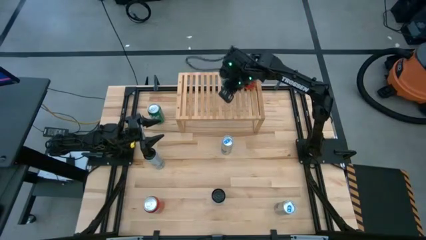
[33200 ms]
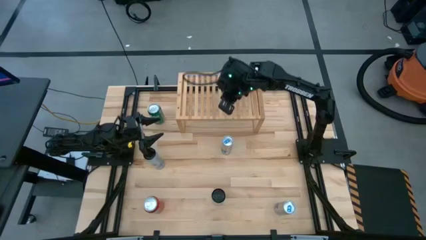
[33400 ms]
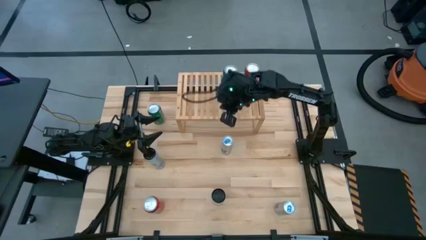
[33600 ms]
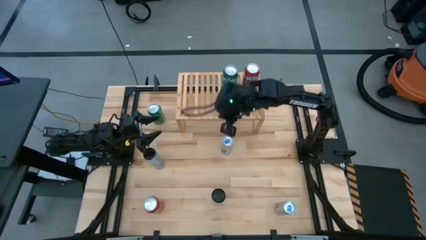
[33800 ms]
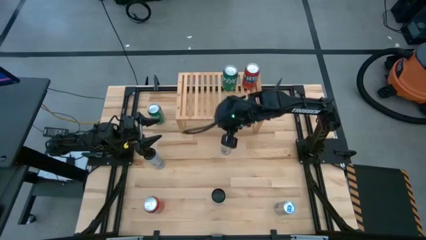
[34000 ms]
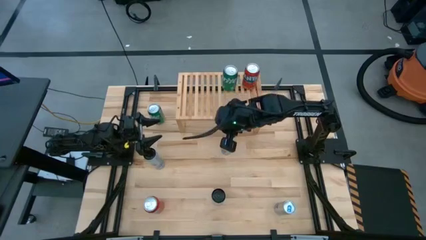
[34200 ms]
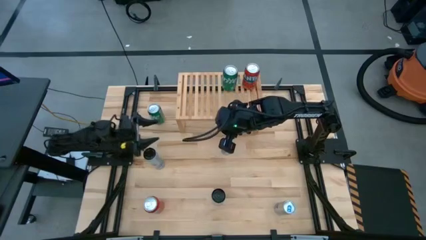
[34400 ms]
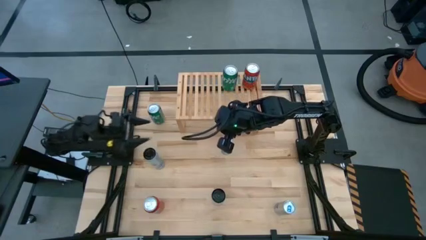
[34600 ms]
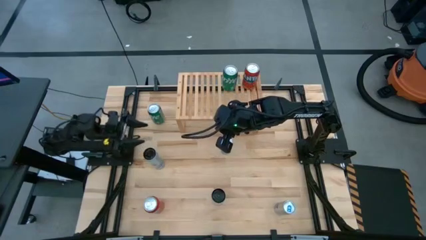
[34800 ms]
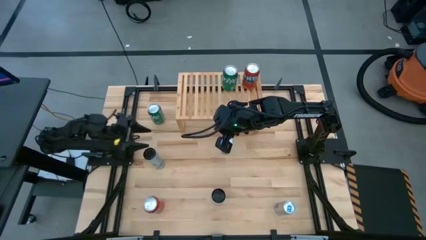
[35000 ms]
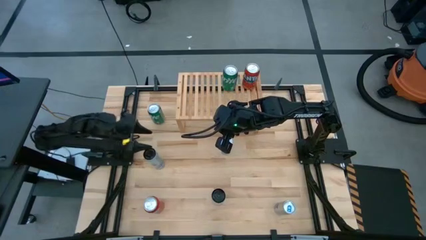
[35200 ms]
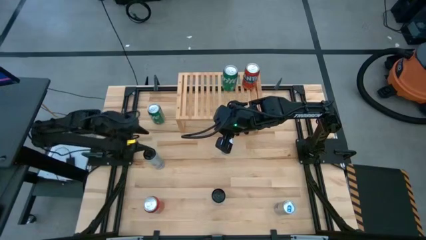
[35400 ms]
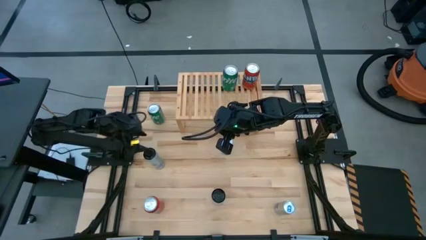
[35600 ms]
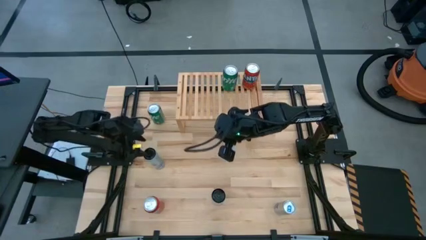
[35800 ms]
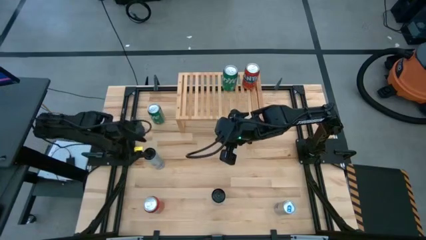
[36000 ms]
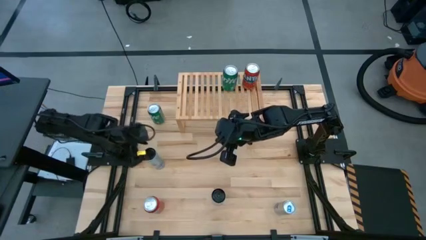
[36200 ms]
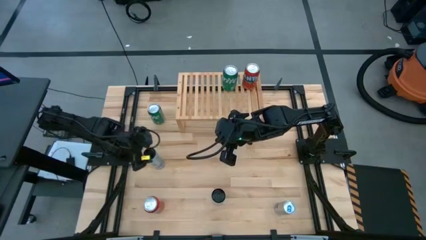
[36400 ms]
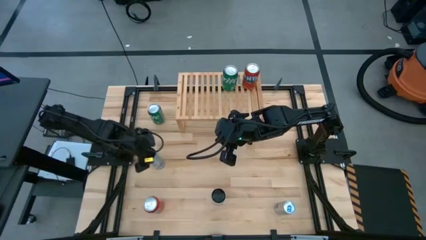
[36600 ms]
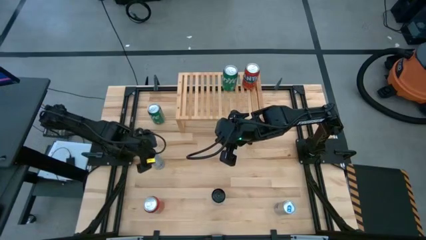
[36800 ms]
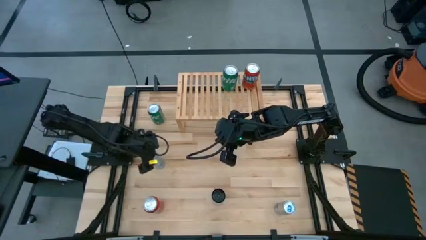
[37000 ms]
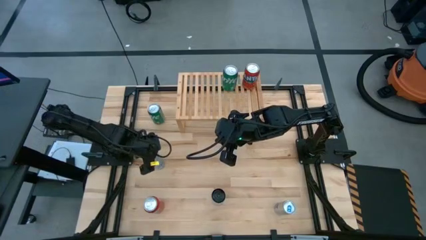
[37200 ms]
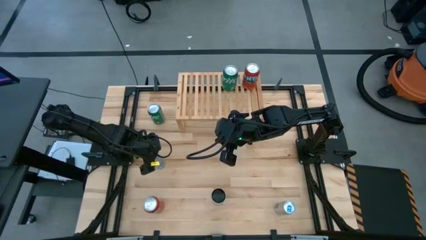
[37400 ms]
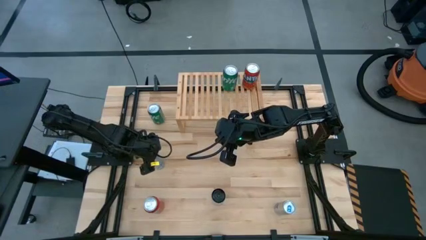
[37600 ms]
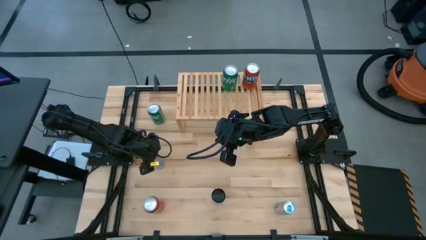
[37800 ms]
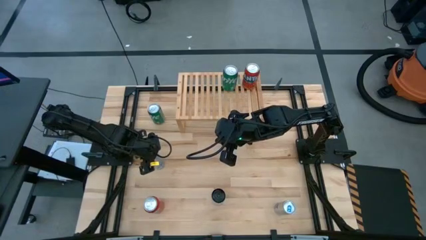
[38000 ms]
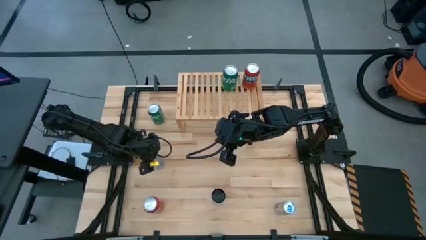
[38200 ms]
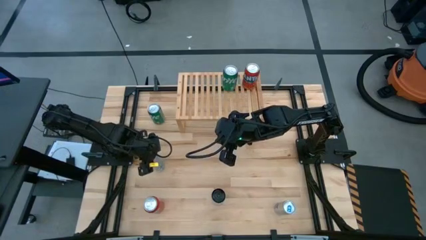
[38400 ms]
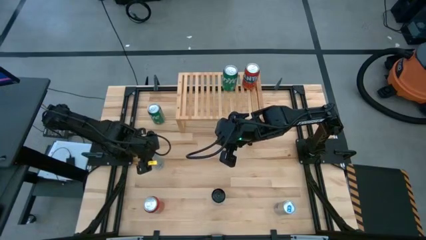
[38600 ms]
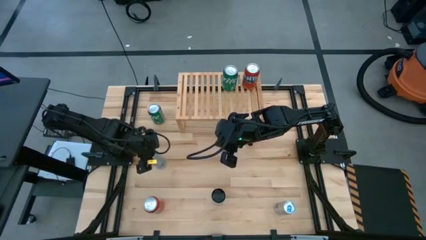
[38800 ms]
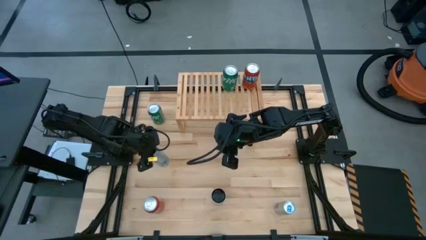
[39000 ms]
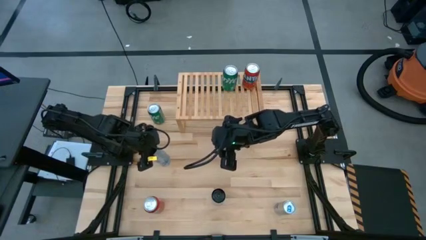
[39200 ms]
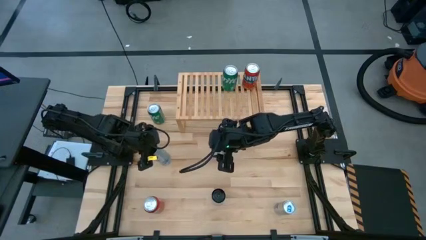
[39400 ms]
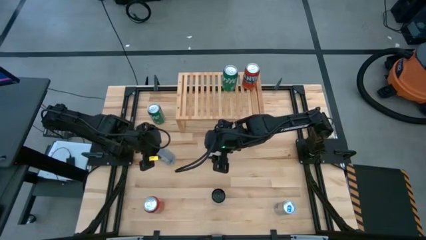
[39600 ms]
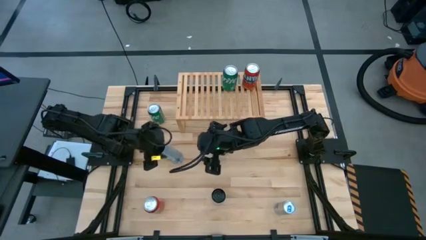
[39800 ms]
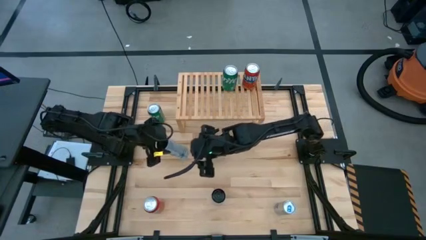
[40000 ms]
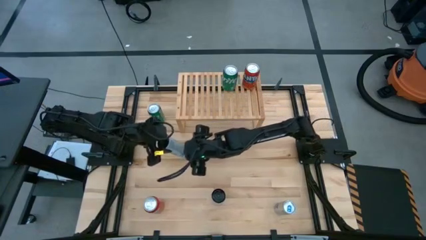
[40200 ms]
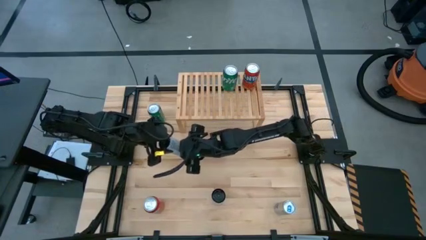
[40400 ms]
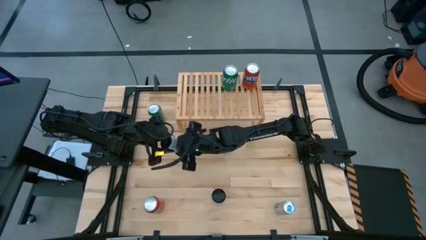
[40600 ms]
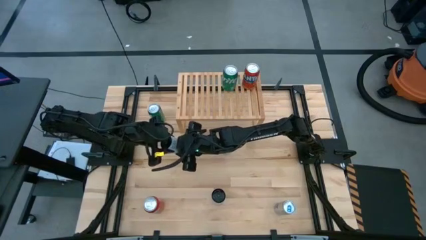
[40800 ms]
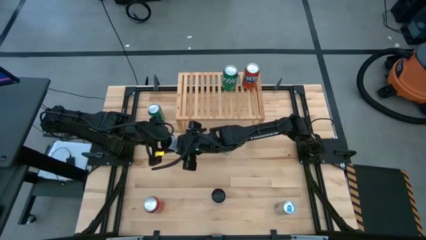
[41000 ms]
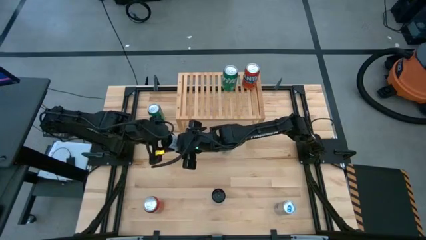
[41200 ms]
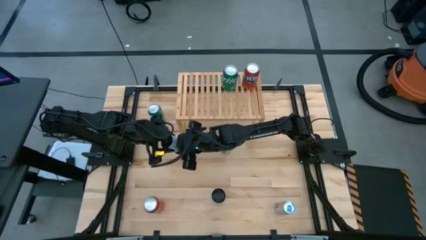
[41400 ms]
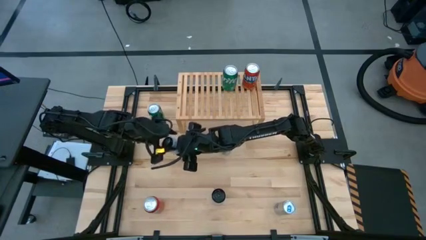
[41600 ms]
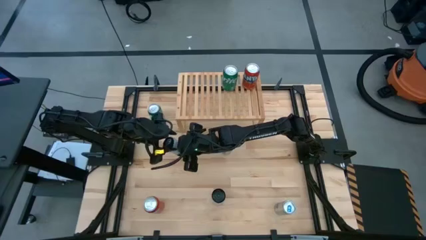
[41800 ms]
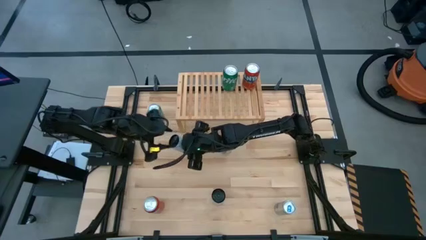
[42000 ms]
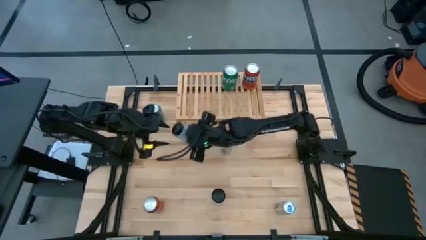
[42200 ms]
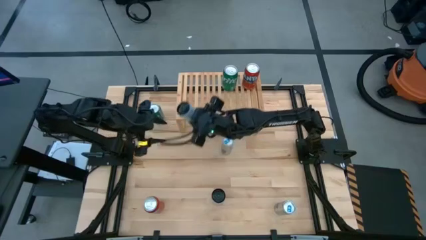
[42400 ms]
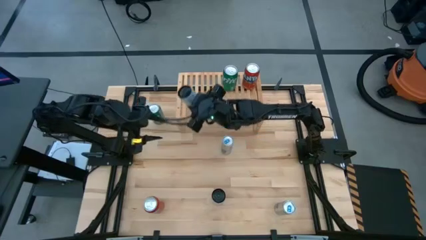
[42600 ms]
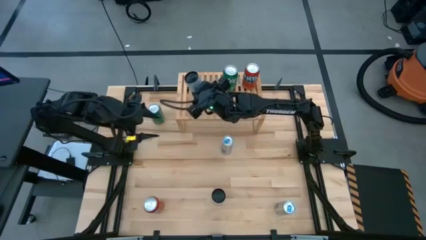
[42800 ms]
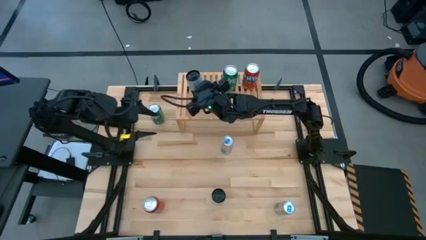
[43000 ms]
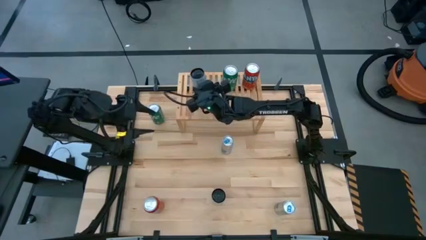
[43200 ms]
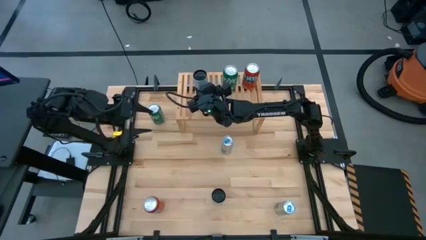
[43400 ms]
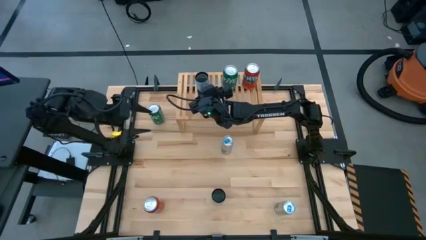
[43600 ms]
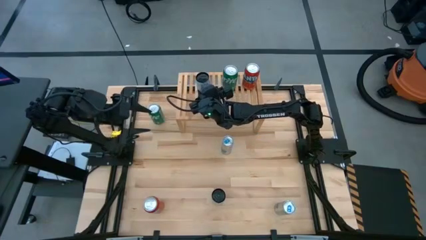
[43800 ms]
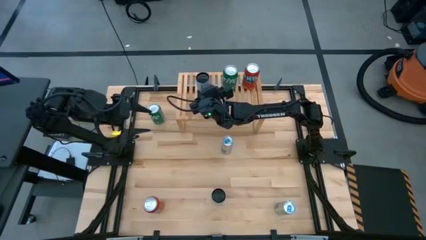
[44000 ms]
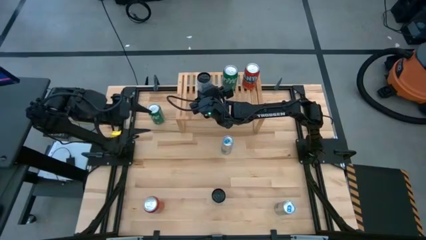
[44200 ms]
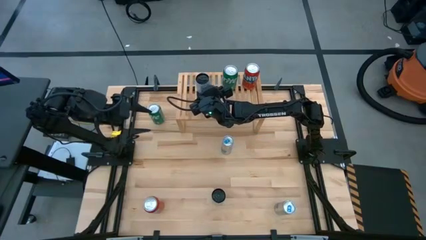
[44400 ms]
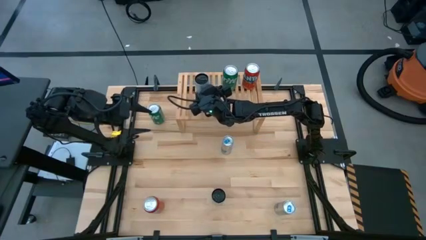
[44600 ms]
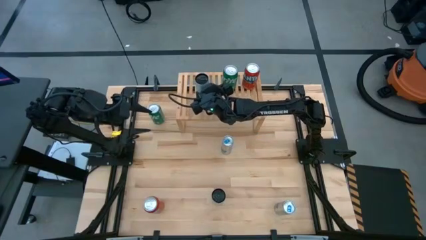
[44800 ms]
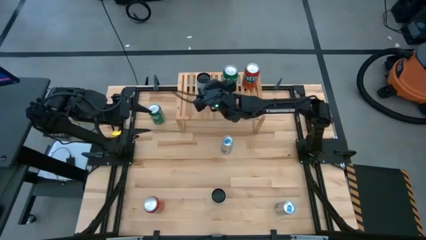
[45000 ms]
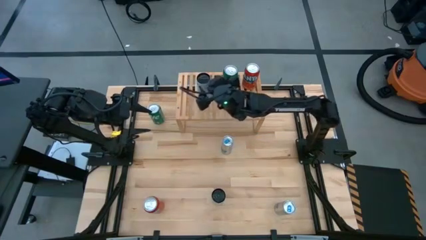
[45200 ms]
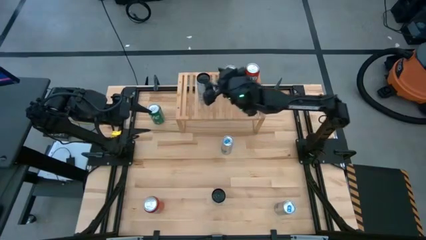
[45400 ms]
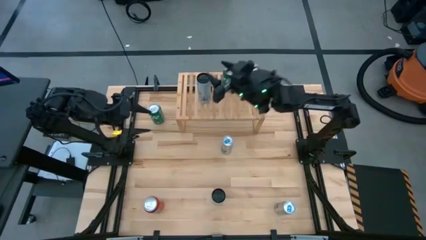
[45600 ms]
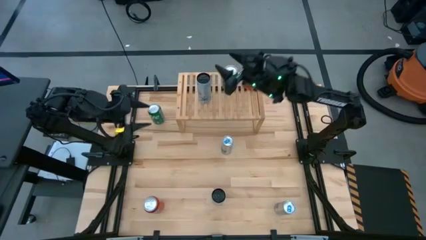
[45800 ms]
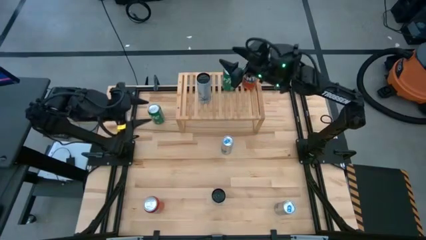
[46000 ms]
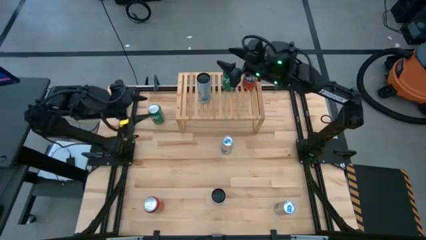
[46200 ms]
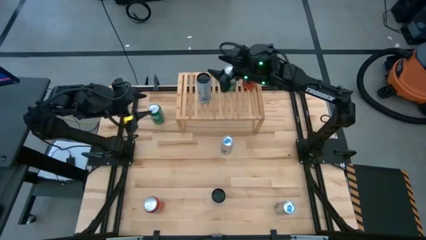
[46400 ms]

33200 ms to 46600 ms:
Task: Place canned beverage on shelf
Put the left white blue soda can on the shelf
